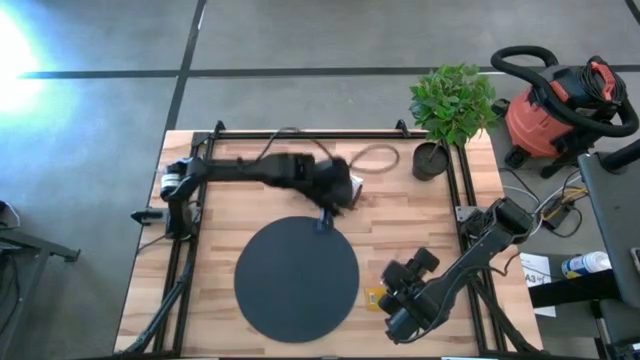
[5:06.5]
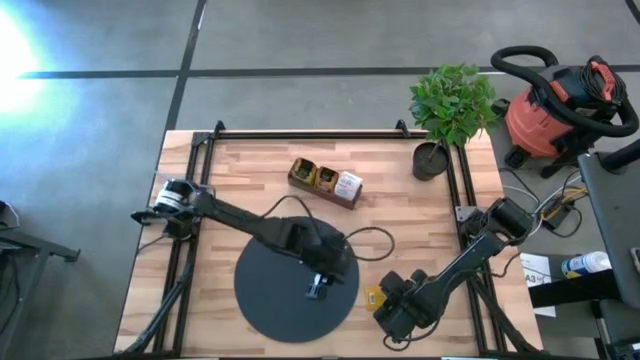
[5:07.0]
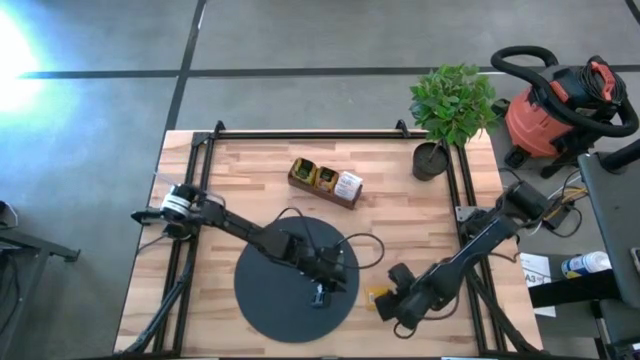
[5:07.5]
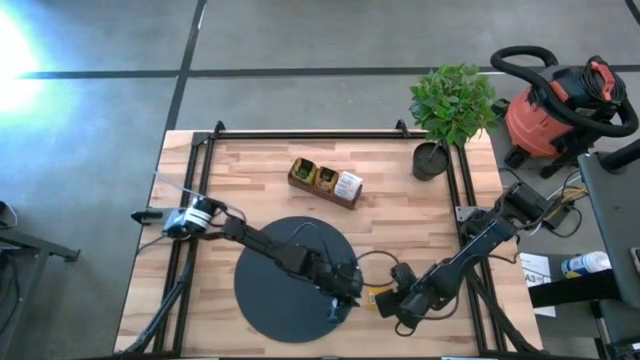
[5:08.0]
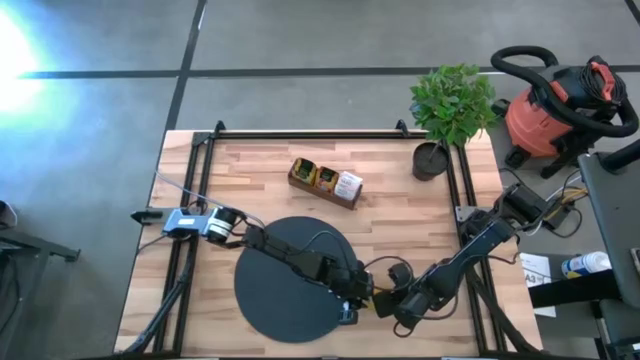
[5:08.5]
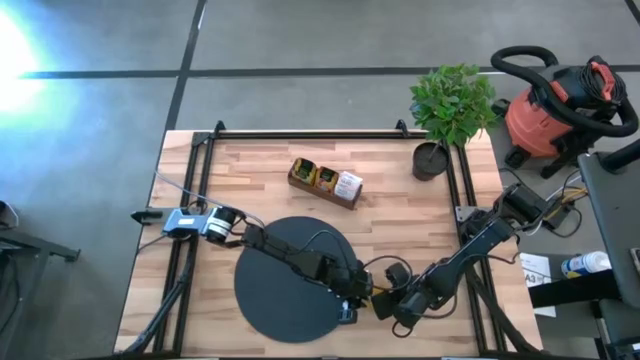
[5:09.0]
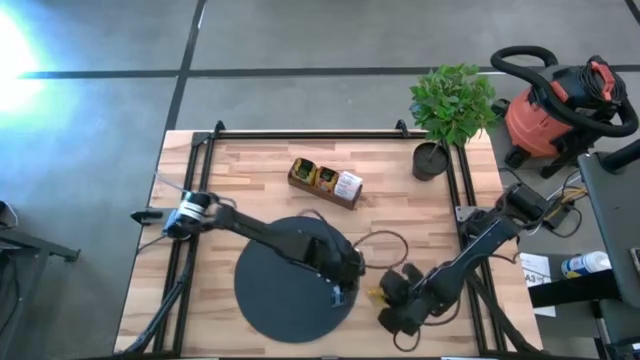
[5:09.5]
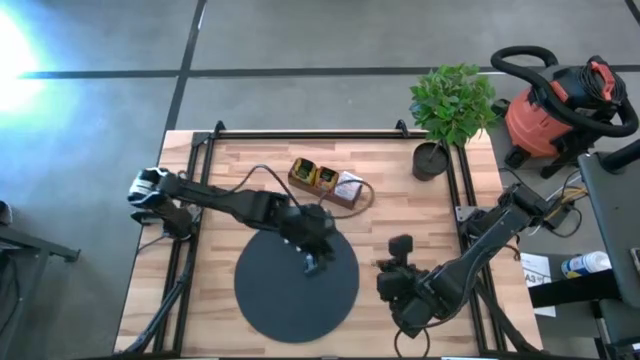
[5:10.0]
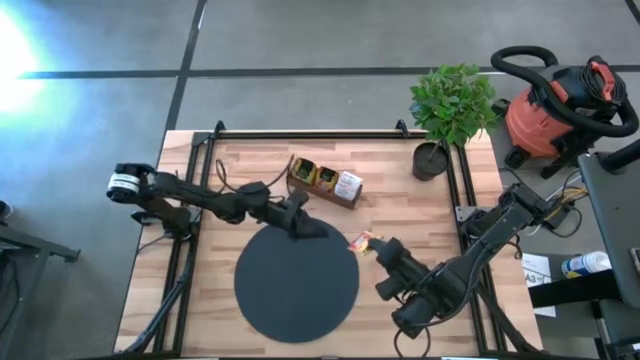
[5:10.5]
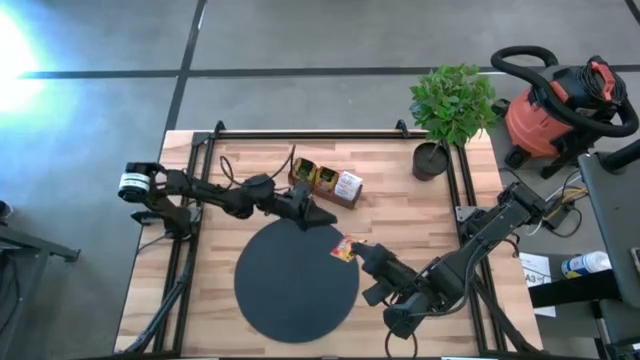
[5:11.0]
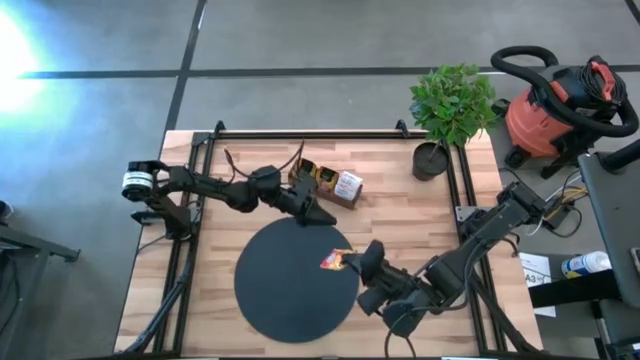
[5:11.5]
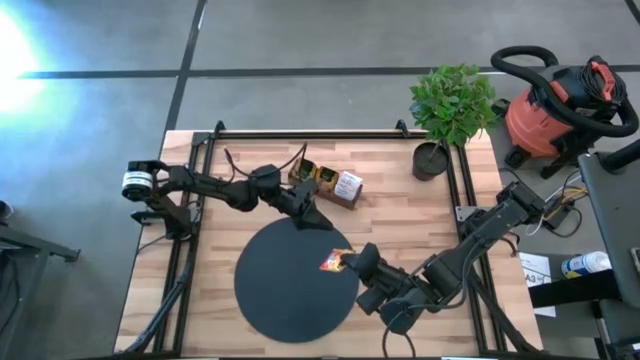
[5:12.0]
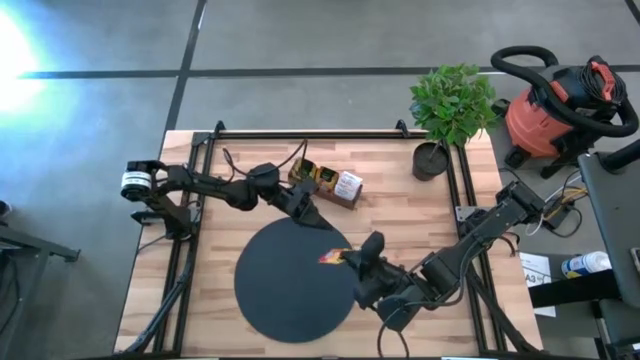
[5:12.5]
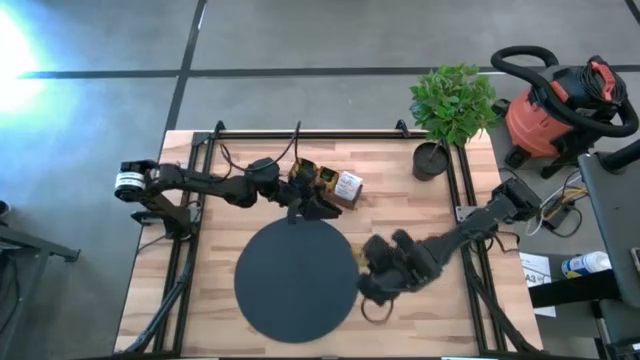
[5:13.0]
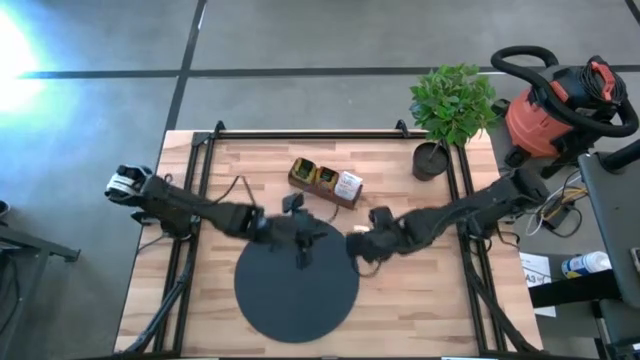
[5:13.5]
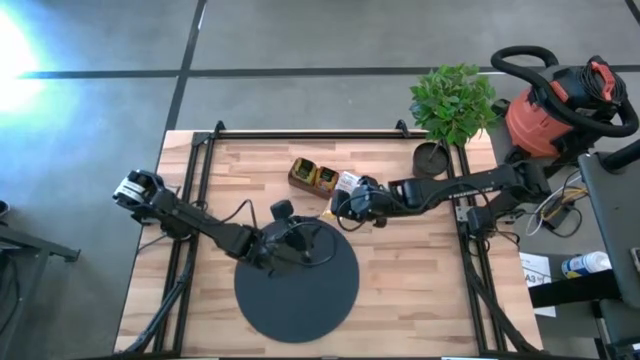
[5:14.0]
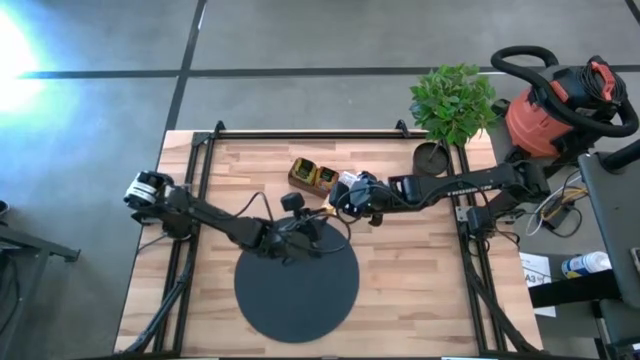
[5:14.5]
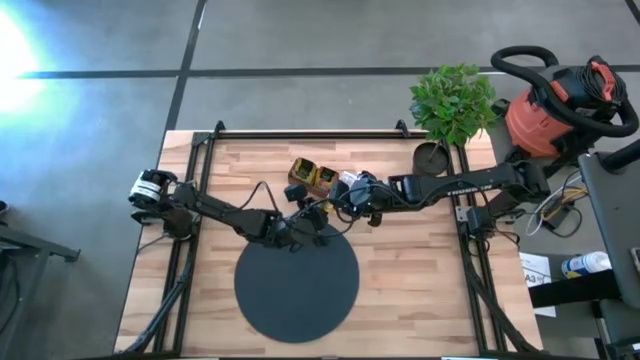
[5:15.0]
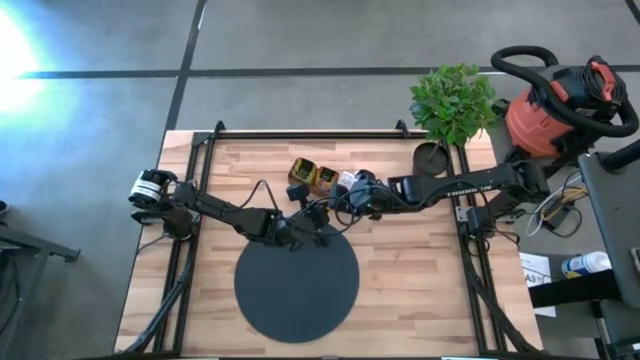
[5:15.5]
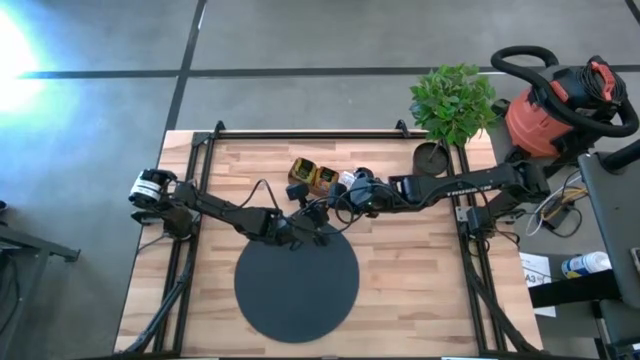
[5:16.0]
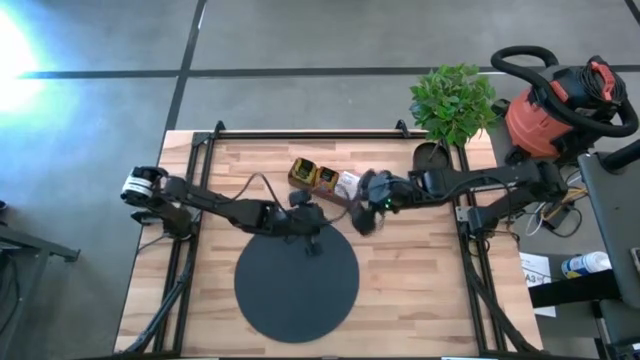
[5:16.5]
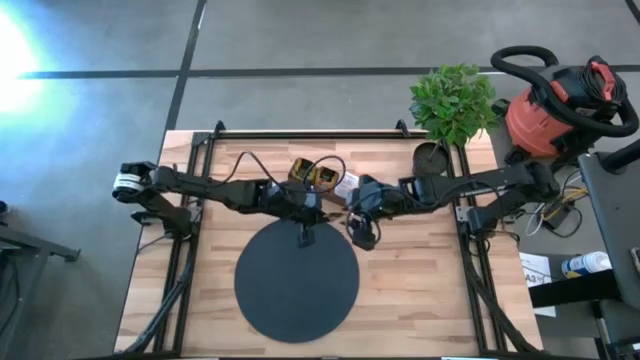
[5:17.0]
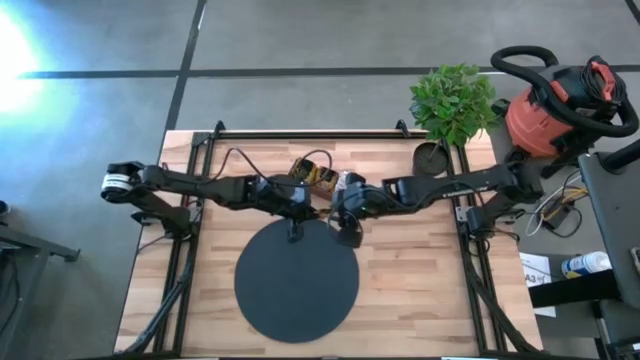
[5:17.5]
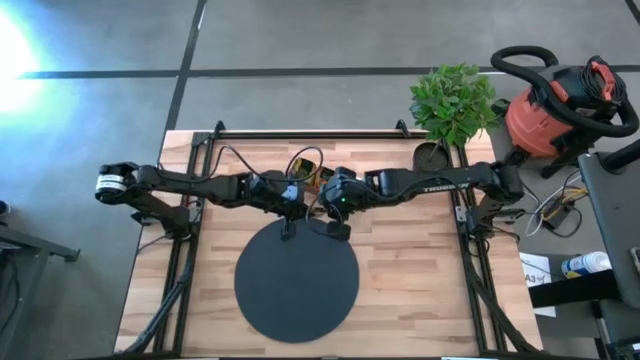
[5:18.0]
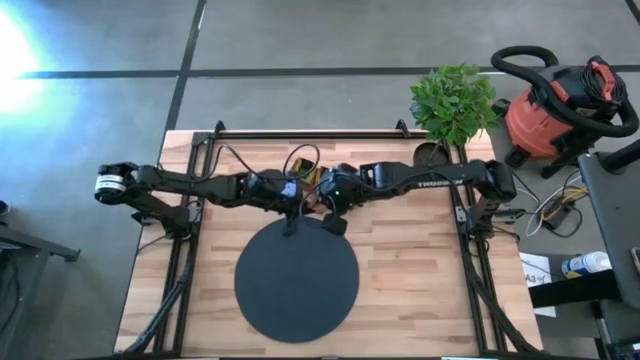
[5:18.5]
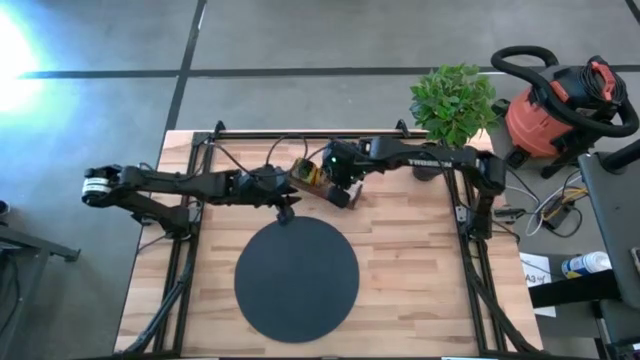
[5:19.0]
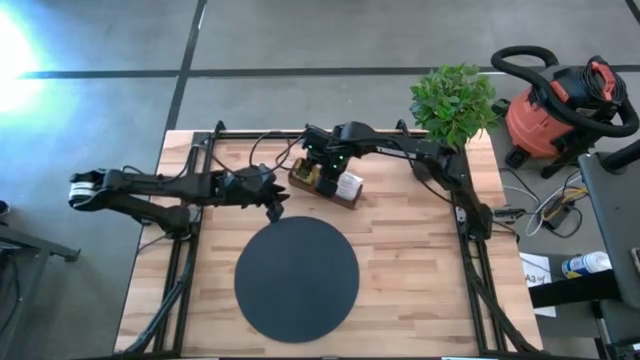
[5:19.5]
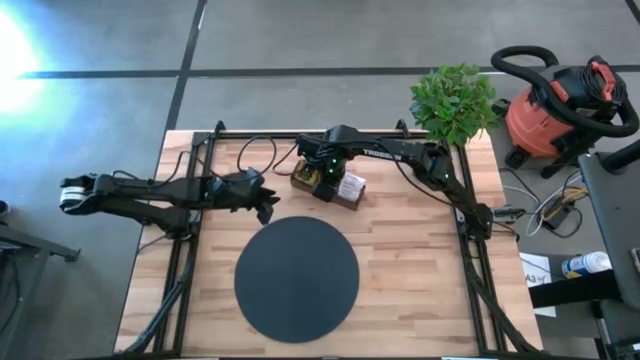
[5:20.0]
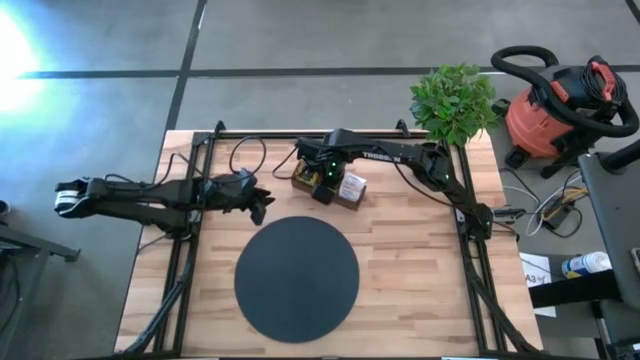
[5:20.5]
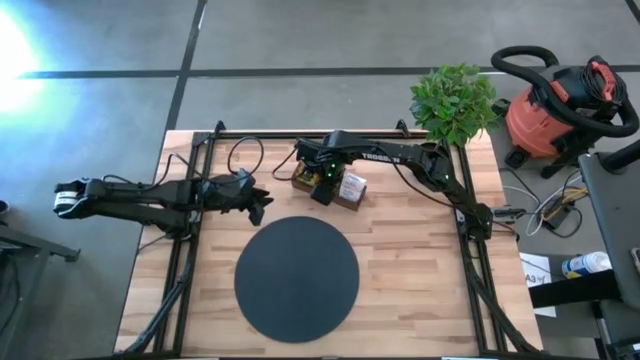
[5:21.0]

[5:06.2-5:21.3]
Task: Pick & Place Tea
Put the orange tea bag into the middle section of the wooden organizer

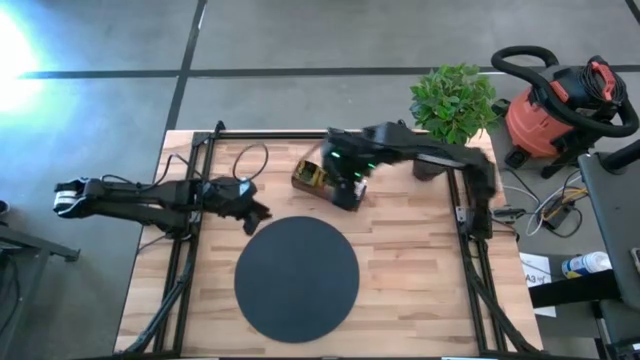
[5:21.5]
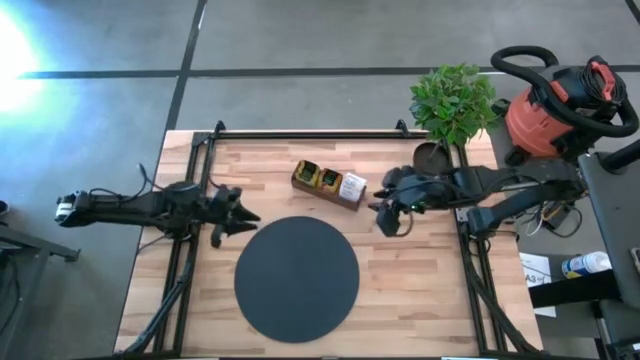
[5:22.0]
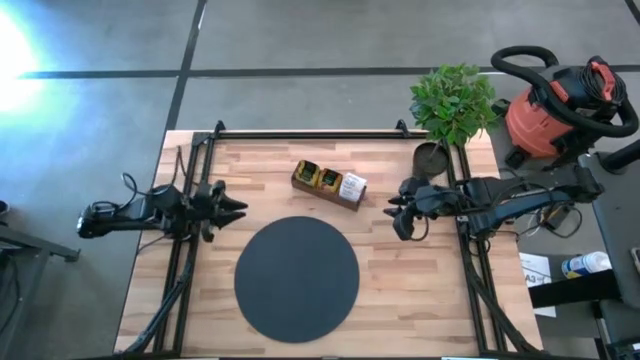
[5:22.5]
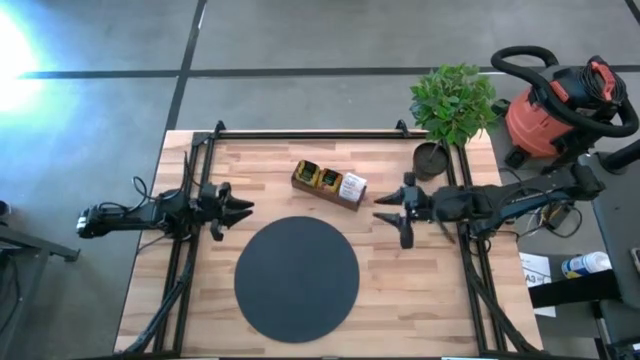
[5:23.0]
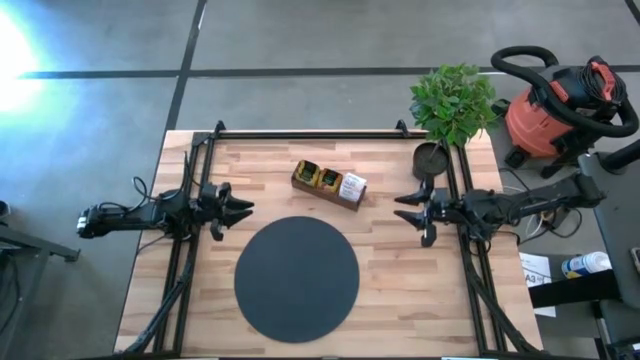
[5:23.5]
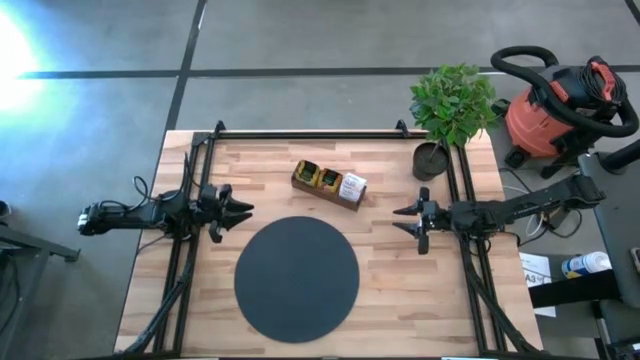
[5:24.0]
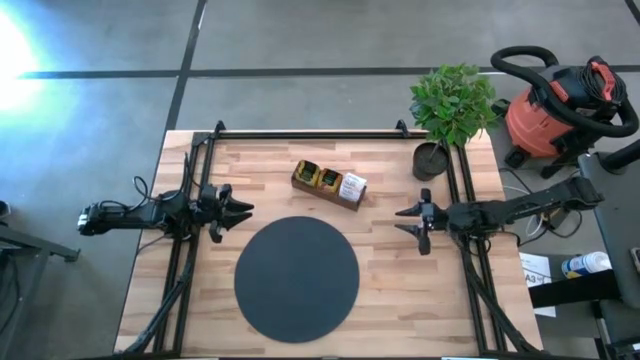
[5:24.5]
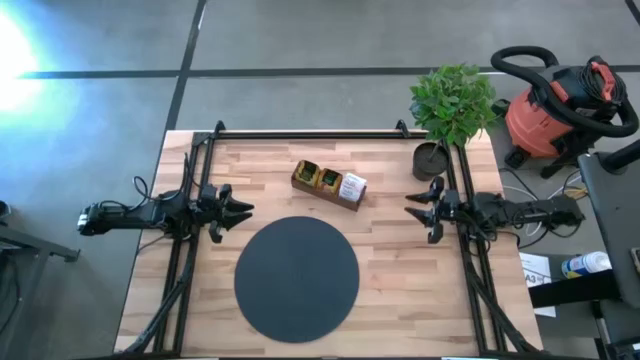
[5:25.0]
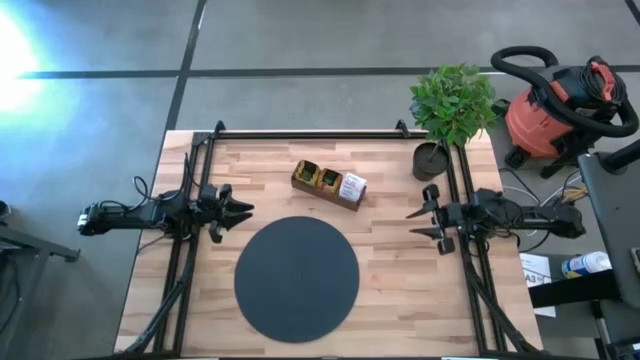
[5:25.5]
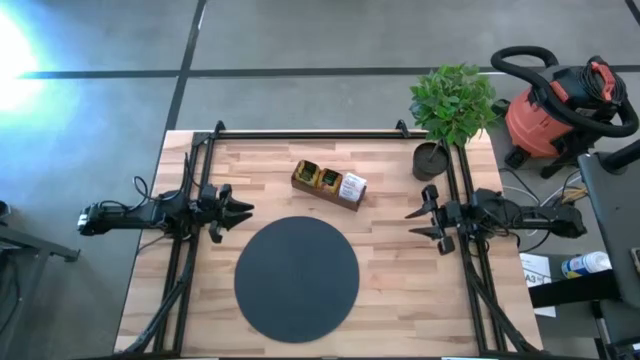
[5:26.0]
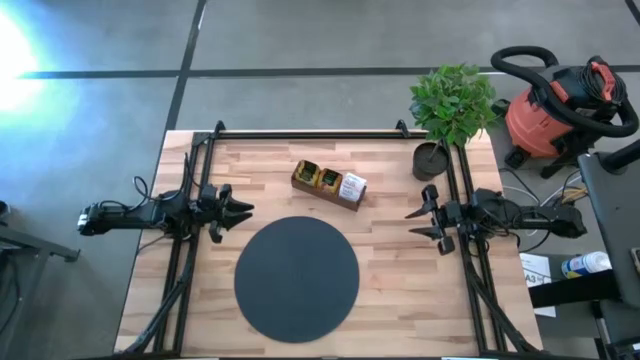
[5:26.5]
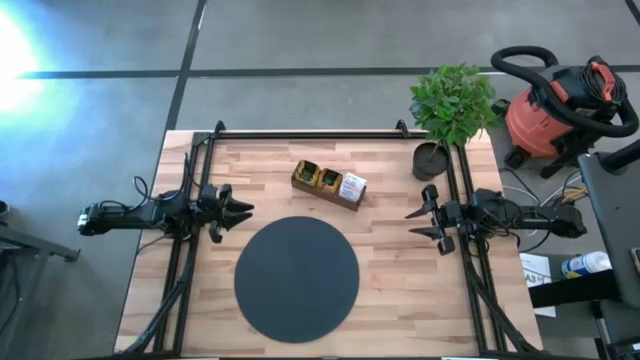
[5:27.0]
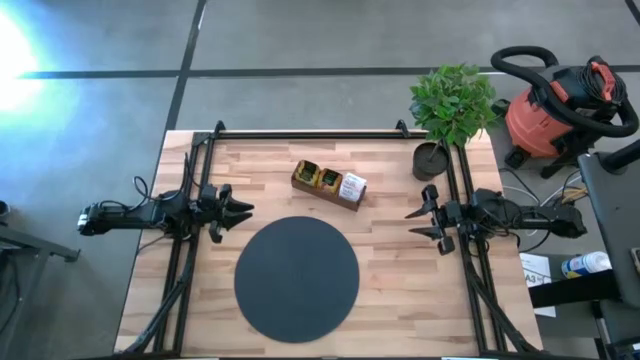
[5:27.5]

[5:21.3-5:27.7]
Return to Home Position

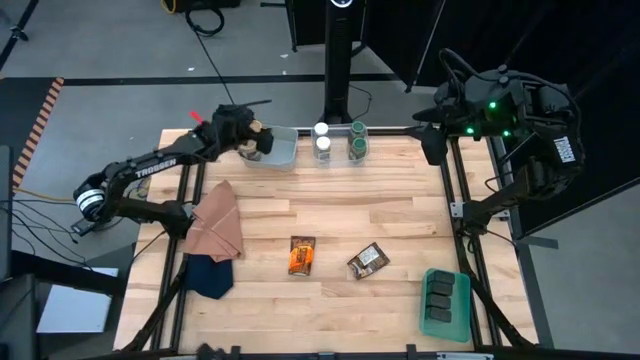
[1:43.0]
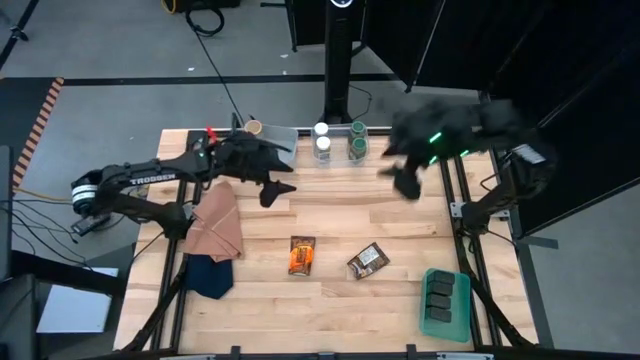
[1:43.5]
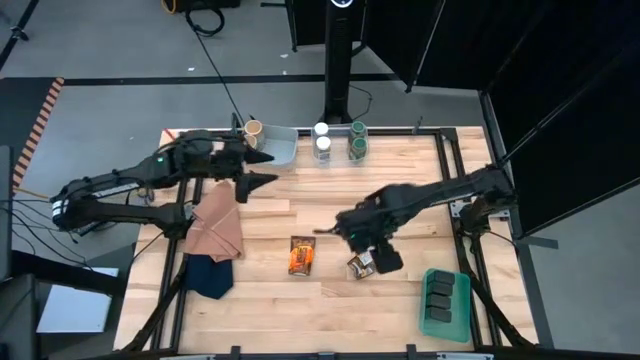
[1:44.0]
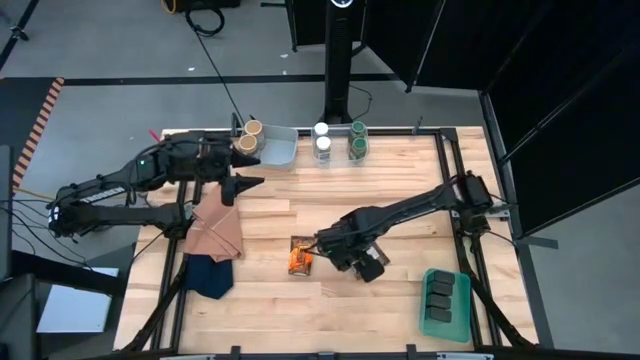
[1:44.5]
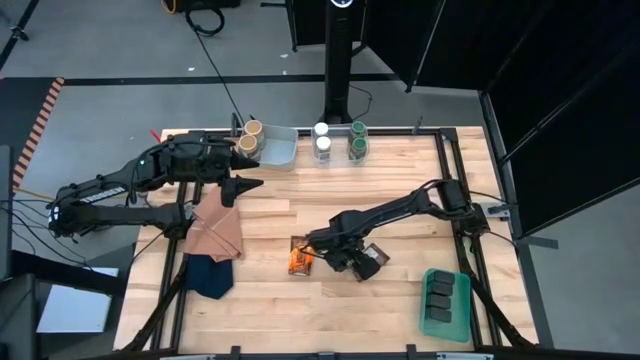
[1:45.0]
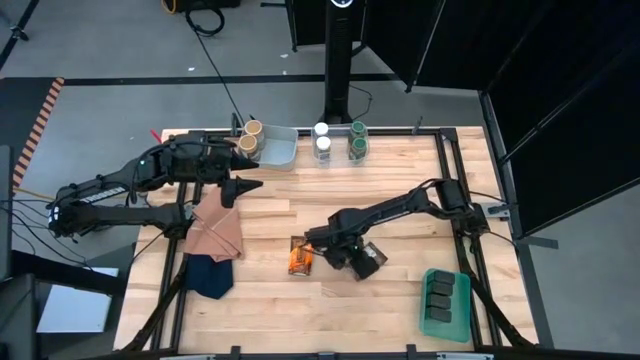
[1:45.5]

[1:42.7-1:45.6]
Task: Sort spices by type
Put the right orange seasoning pack into the gray bin
